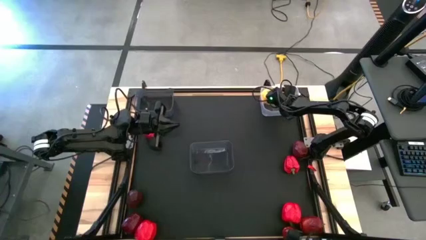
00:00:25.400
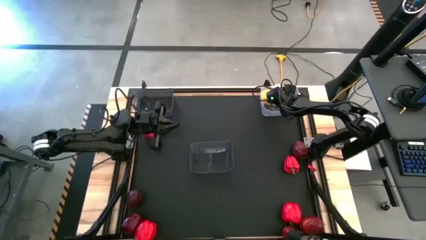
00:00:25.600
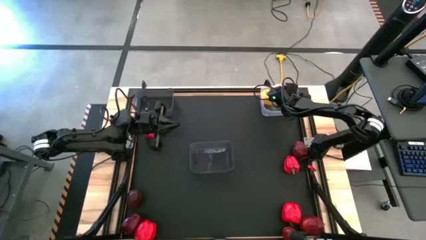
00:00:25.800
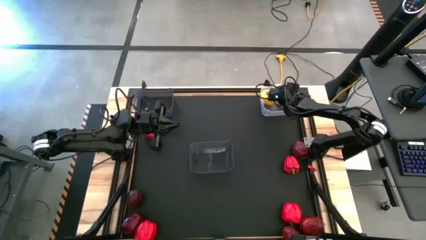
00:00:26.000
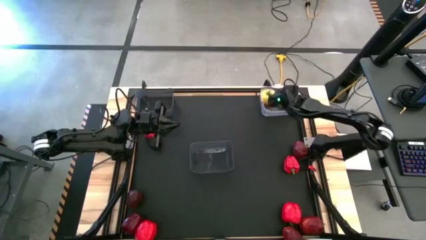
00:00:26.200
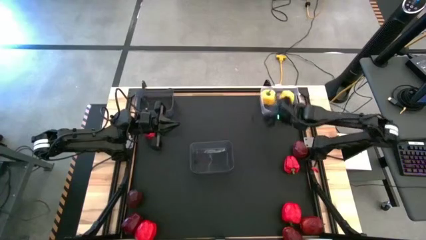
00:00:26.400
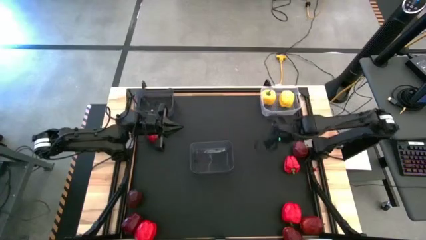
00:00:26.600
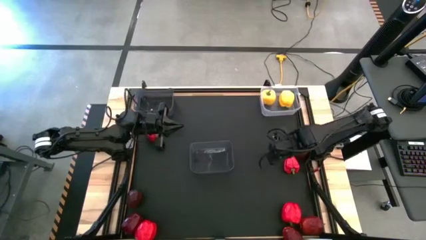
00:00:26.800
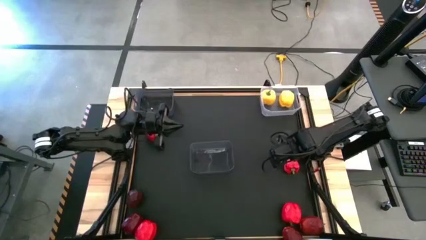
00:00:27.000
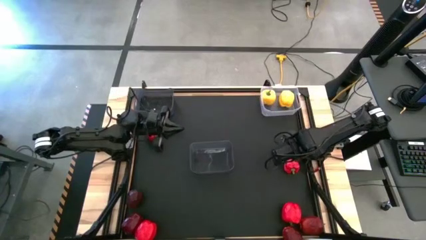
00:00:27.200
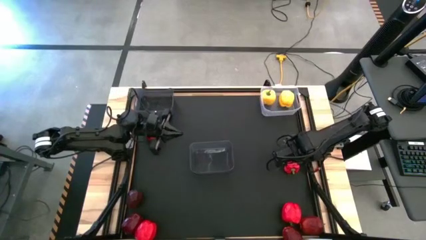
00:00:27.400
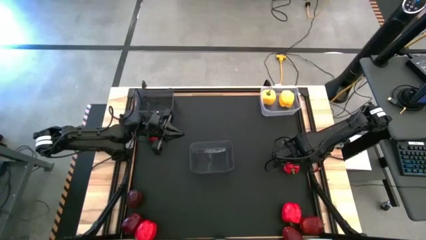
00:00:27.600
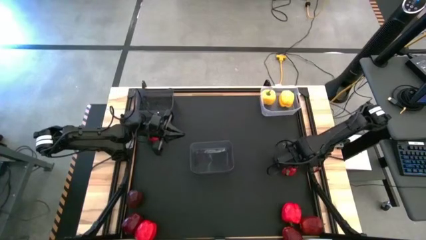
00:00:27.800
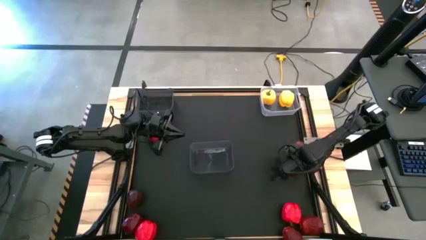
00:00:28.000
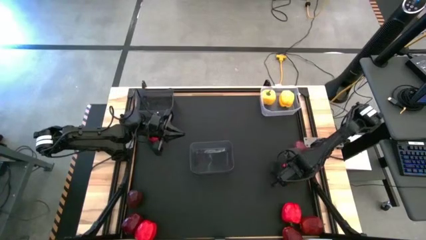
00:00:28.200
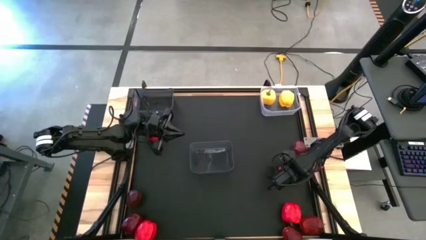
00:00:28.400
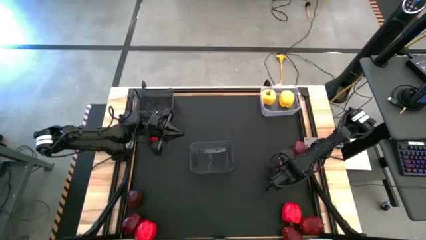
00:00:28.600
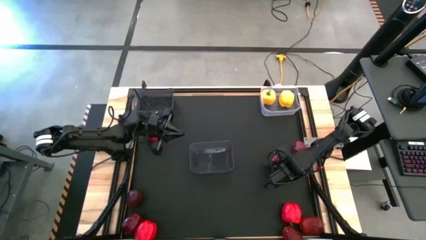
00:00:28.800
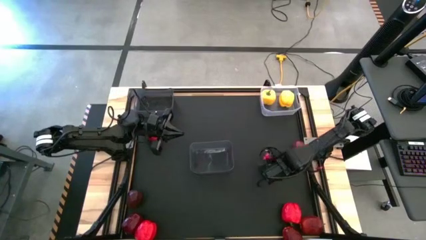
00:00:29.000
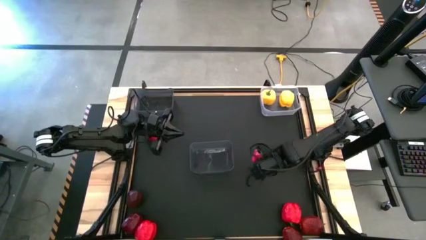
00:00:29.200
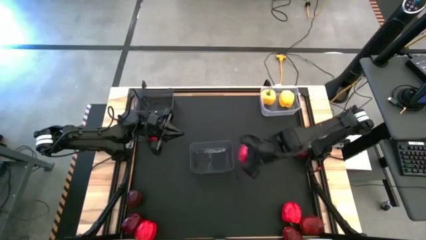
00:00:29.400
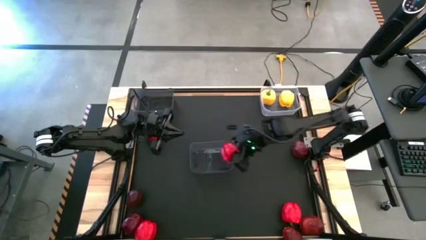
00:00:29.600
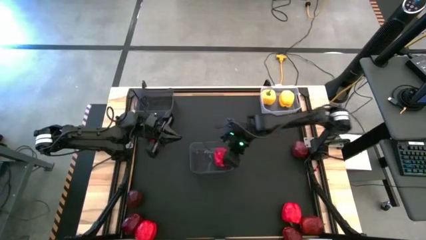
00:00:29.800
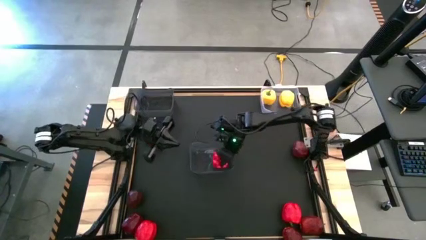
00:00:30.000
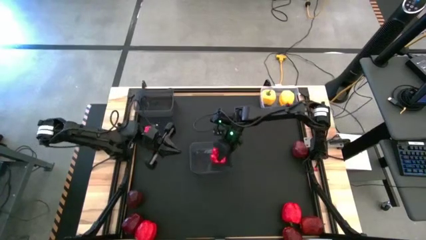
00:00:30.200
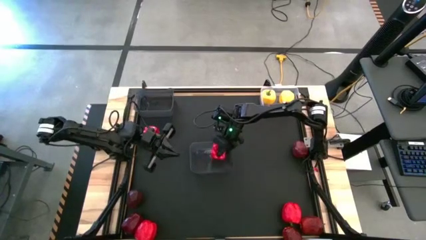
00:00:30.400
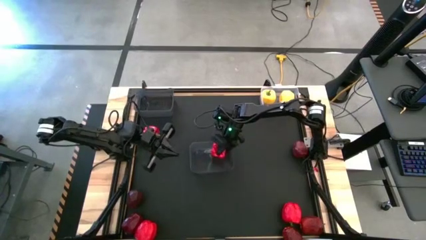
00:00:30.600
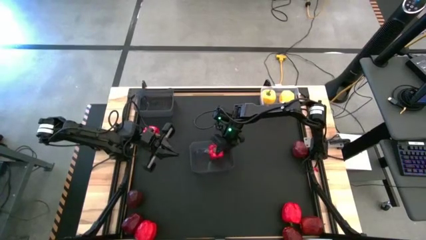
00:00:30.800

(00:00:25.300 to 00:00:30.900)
Task: Sort produce into baskets
Put the red bell pepper into the bottom black bin

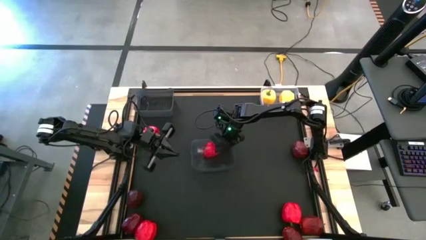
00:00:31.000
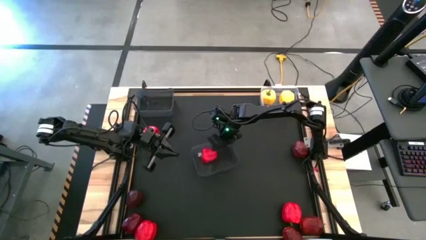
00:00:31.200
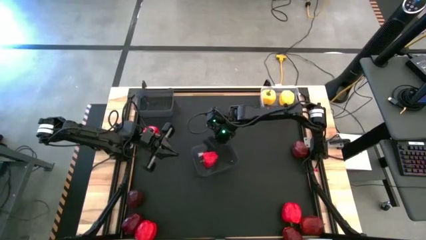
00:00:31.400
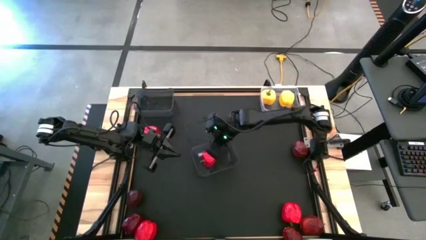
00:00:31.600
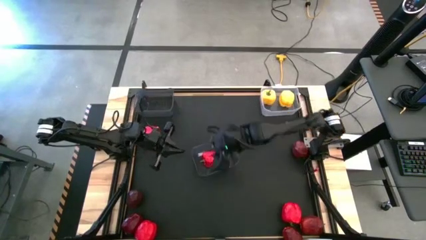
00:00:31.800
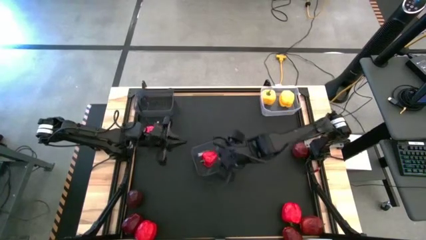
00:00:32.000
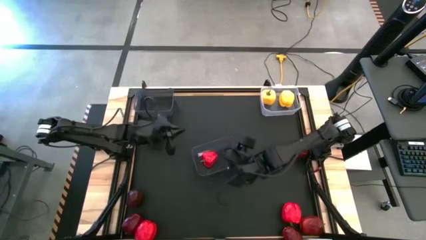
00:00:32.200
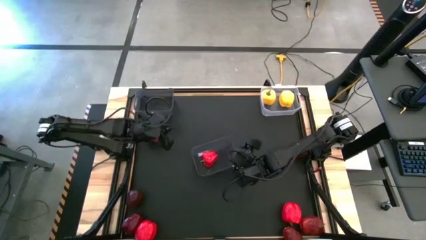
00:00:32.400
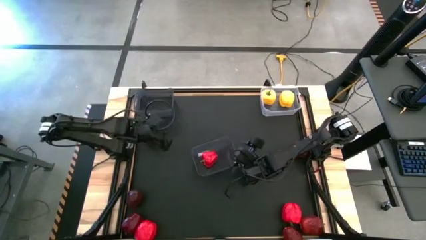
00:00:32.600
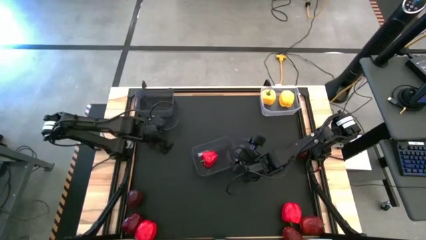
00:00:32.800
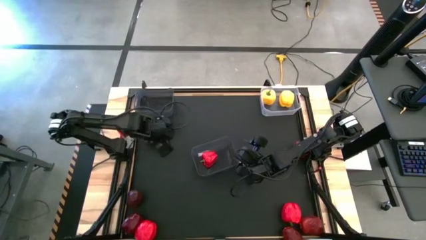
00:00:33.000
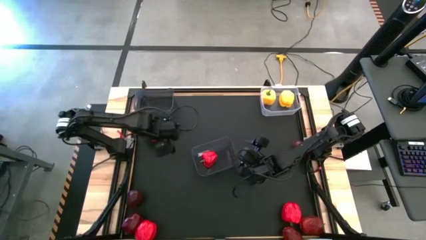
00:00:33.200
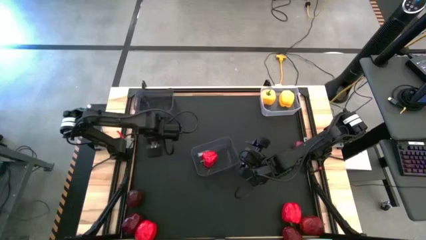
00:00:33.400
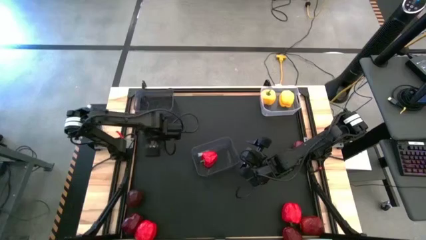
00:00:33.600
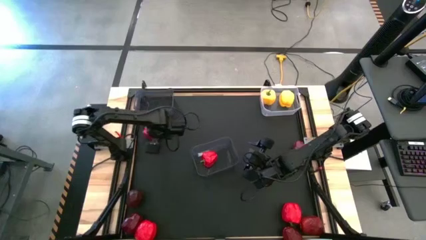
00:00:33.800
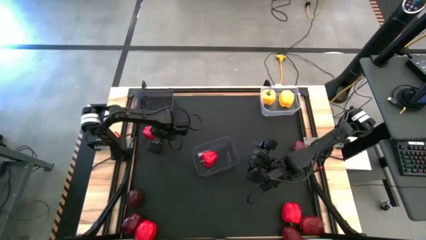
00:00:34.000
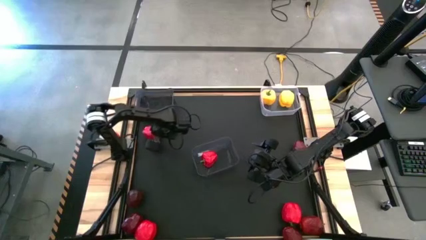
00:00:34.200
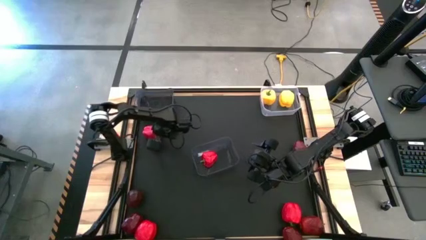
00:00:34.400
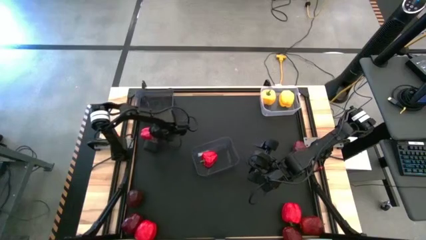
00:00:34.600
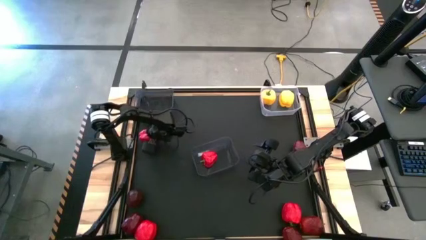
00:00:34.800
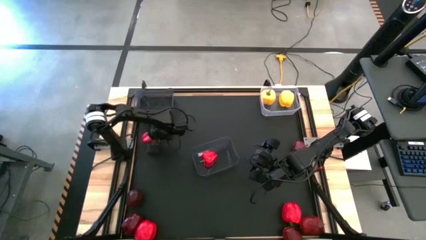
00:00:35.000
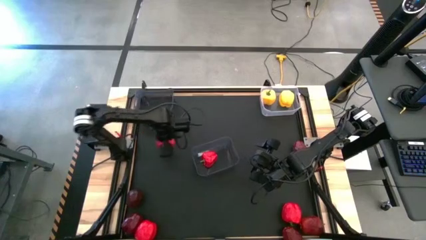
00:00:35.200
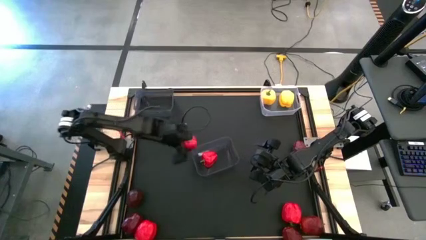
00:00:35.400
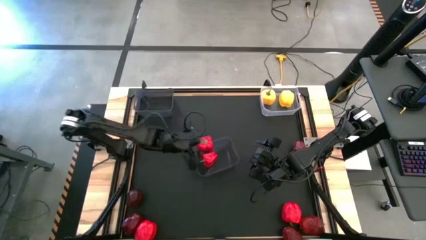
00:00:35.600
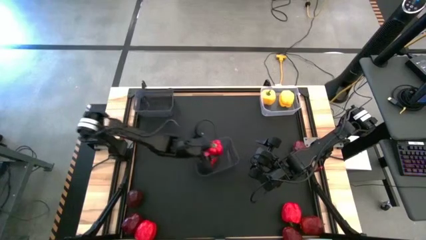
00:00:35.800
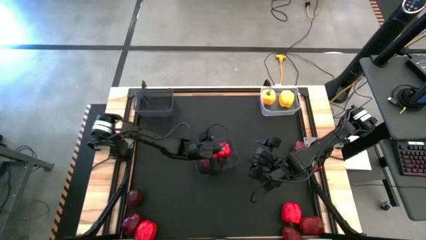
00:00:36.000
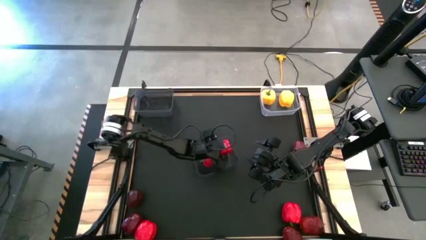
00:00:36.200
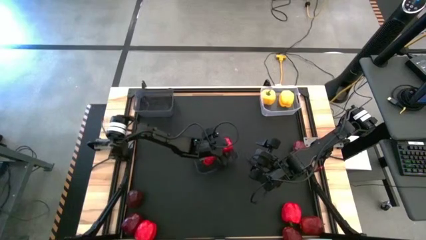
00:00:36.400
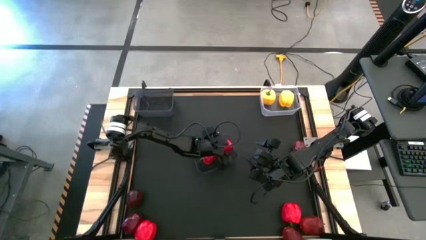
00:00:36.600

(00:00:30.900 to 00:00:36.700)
Put the red bell pepper into the bottom black bin

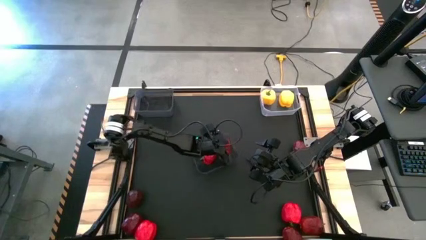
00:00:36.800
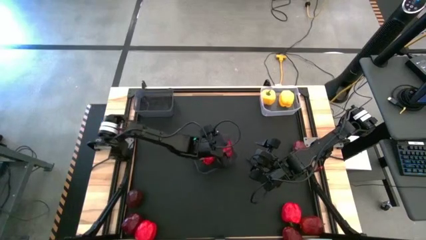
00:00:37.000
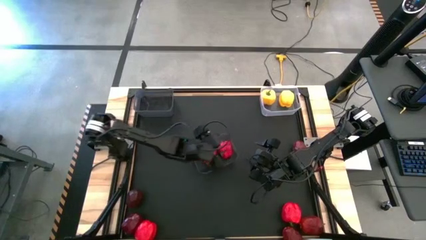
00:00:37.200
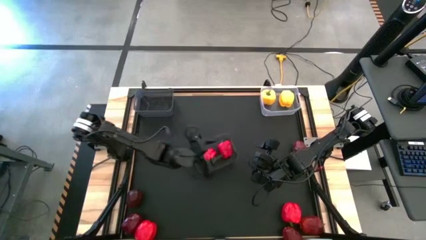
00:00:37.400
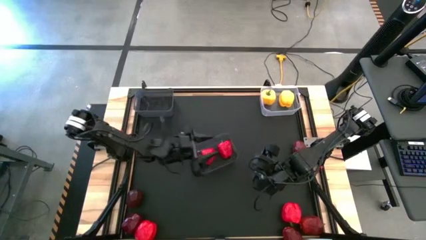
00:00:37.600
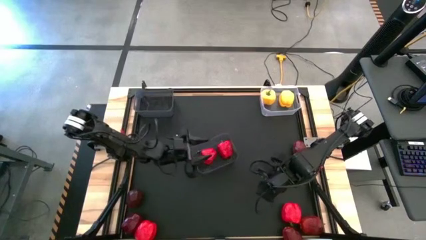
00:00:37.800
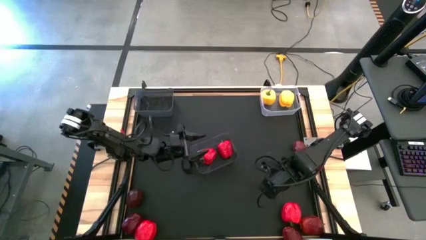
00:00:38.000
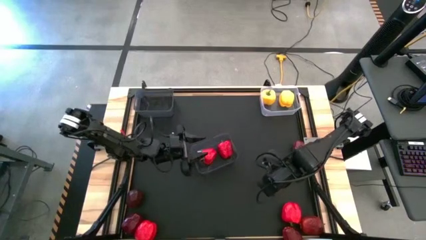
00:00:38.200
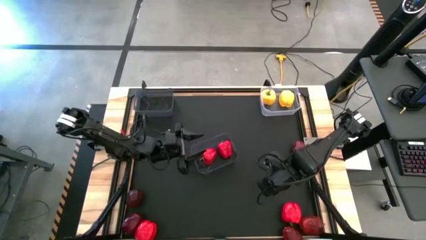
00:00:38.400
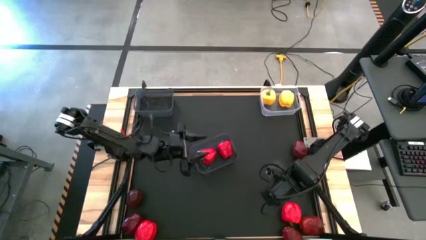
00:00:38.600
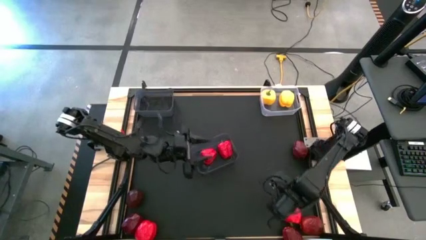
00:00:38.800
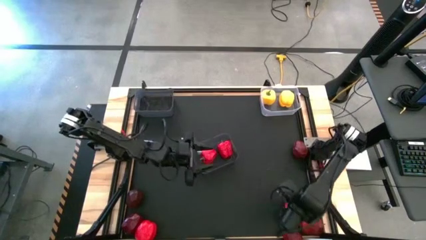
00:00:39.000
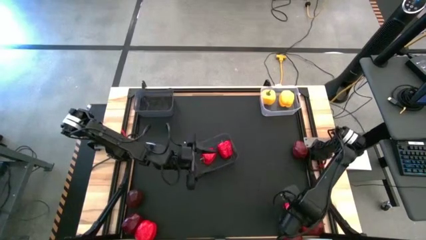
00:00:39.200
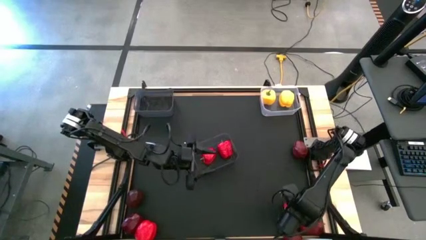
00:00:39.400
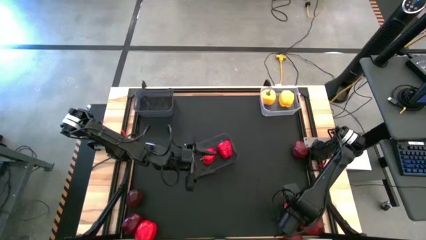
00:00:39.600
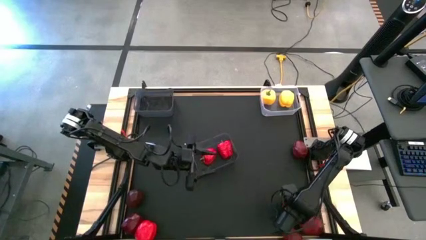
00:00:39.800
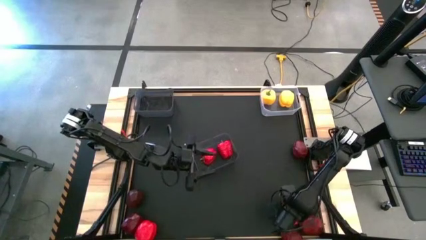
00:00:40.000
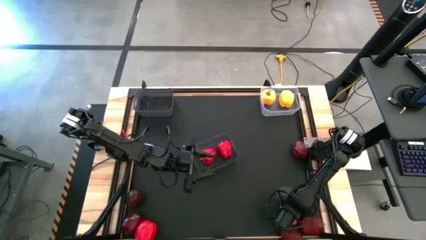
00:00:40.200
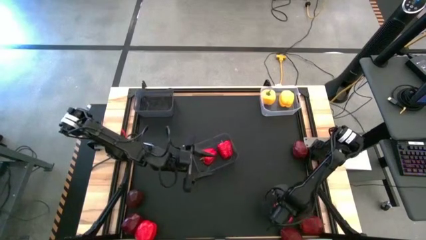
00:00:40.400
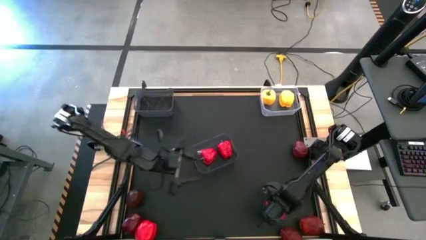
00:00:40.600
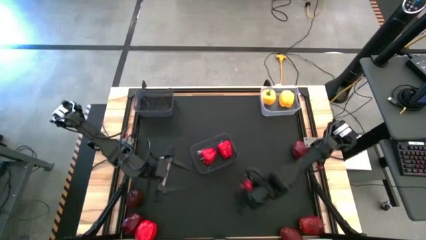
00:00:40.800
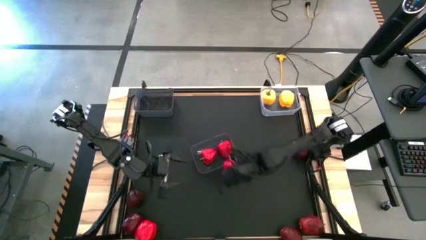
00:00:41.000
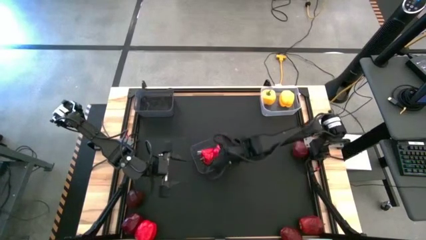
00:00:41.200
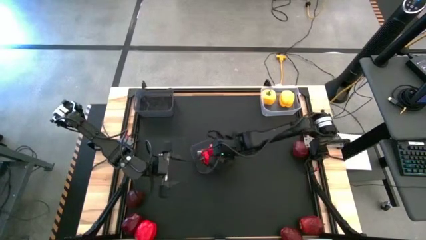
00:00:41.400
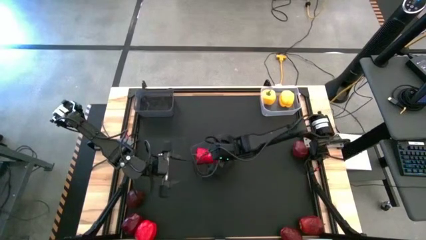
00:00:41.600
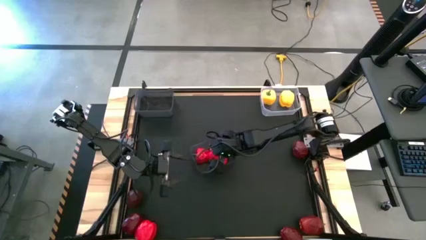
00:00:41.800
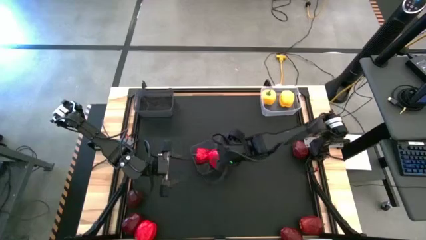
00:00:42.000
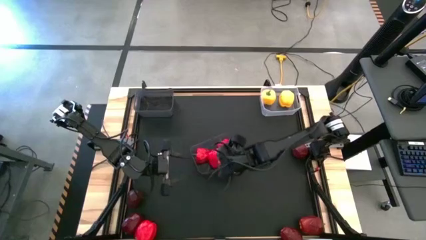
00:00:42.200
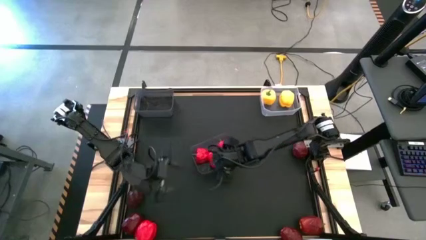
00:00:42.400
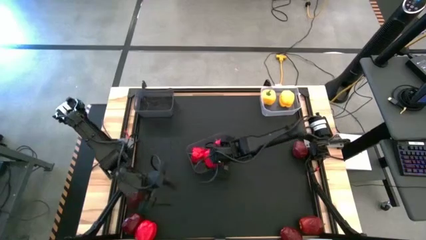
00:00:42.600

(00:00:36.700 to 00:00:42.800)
Put the red bell pepper into the bottom black bin
